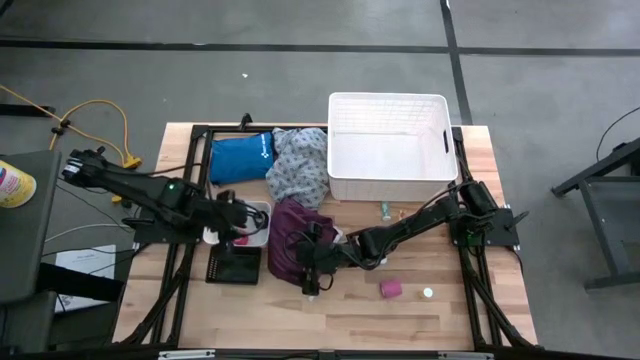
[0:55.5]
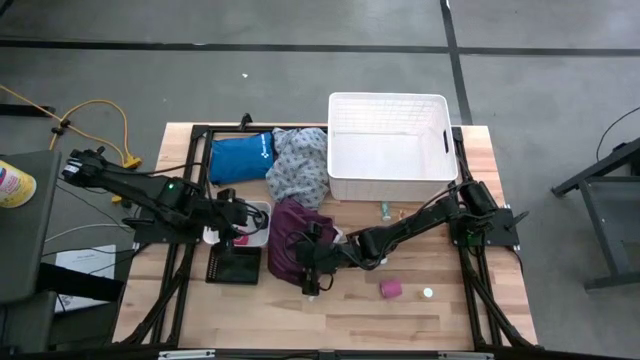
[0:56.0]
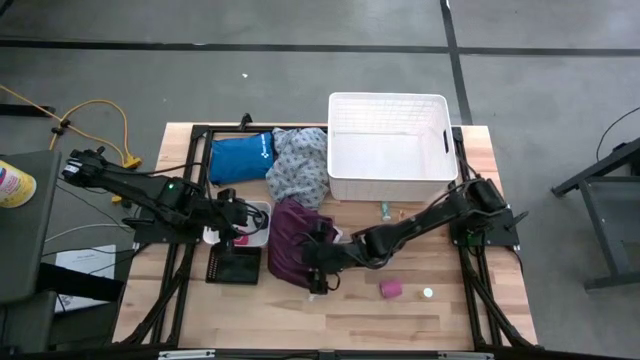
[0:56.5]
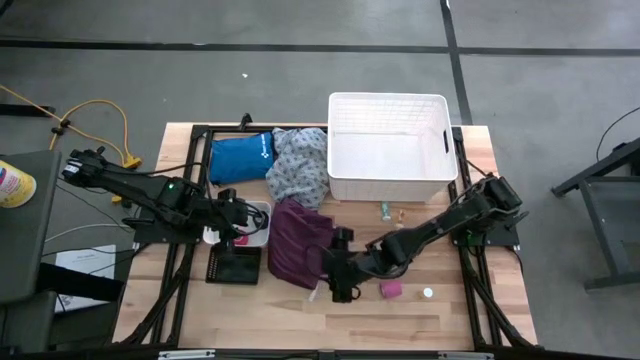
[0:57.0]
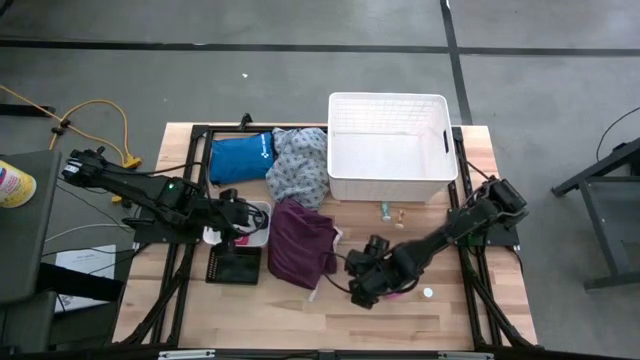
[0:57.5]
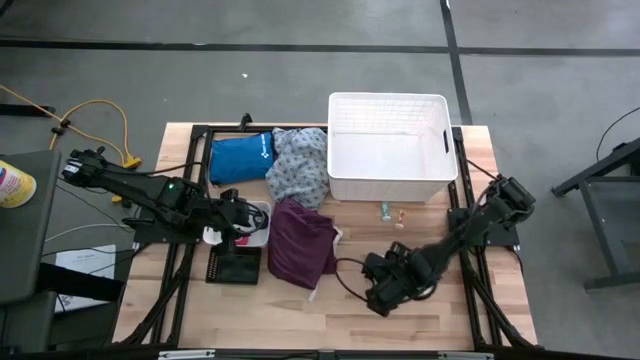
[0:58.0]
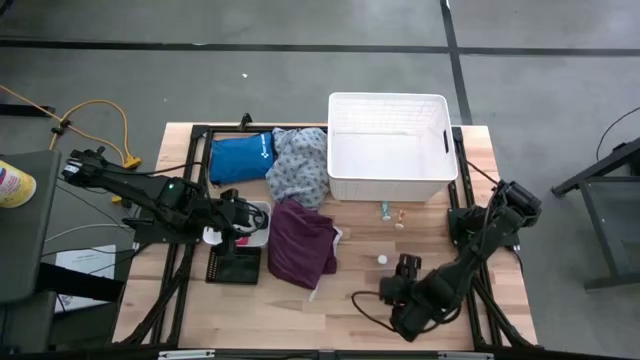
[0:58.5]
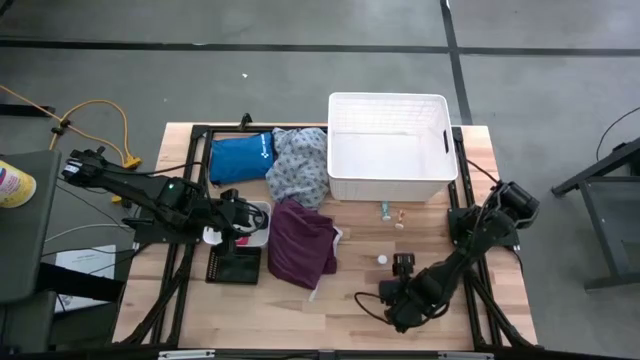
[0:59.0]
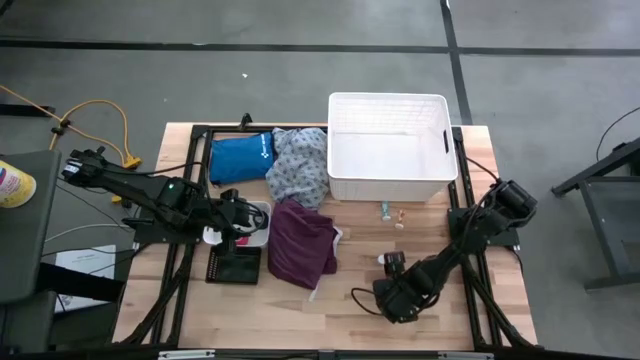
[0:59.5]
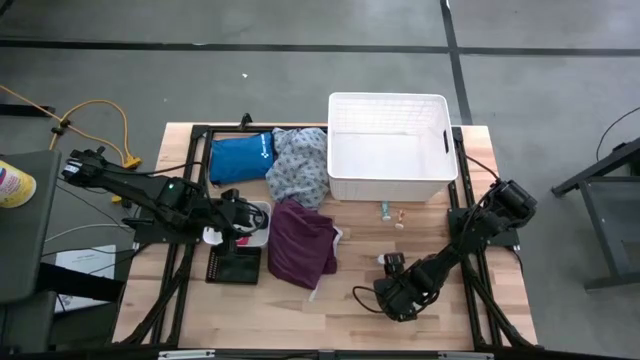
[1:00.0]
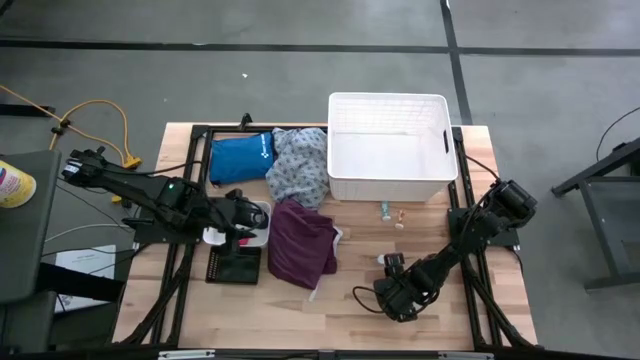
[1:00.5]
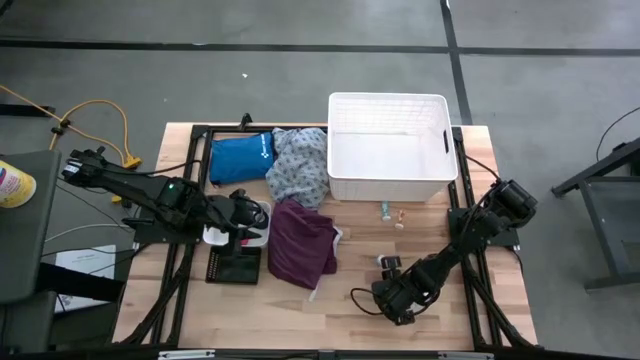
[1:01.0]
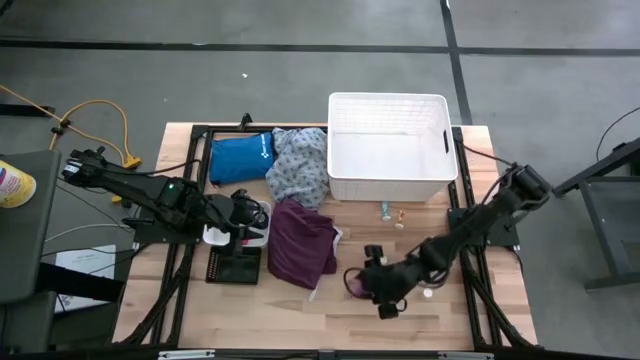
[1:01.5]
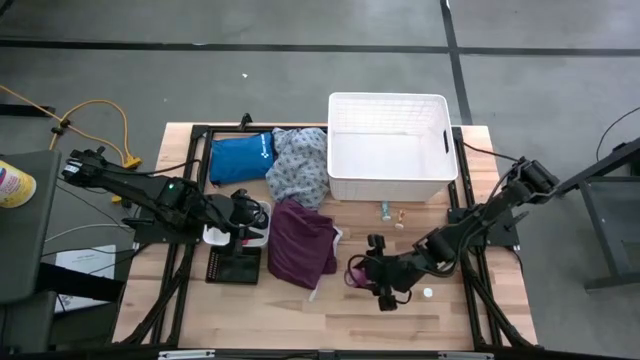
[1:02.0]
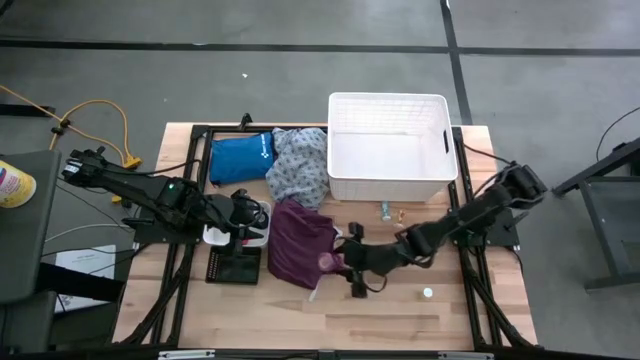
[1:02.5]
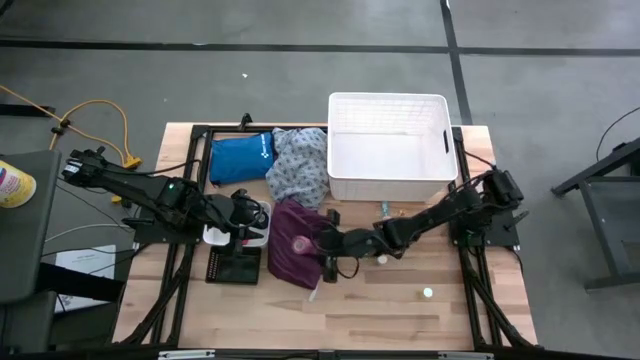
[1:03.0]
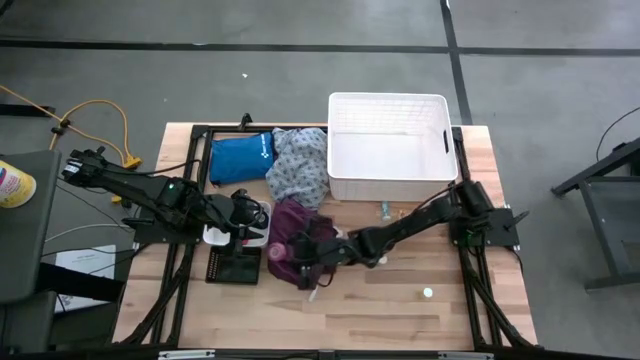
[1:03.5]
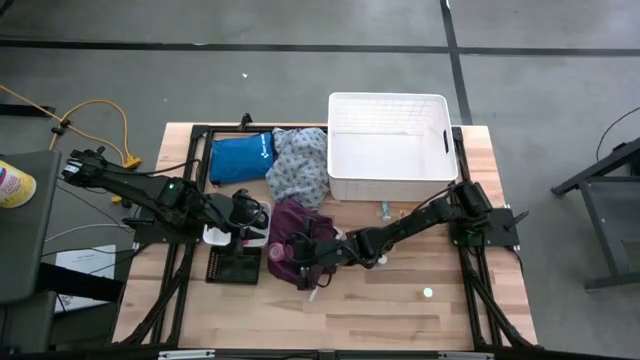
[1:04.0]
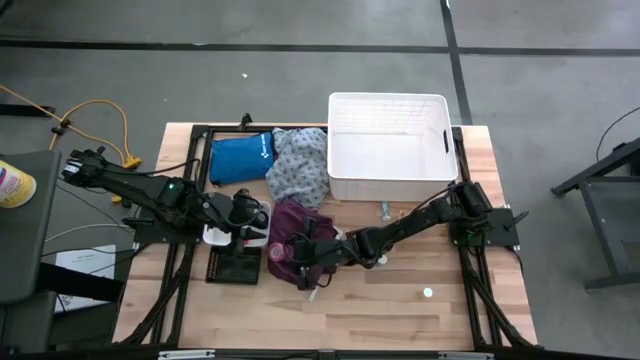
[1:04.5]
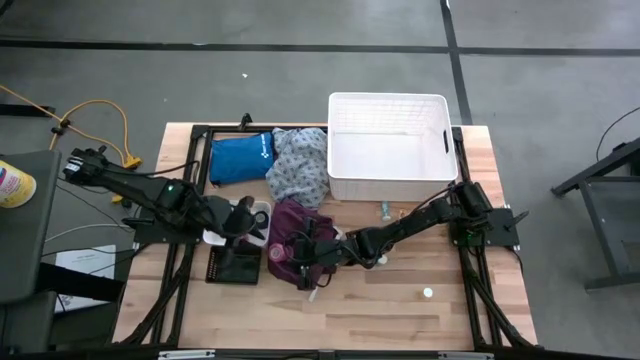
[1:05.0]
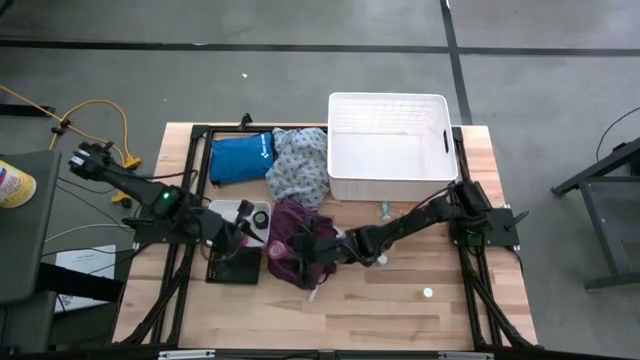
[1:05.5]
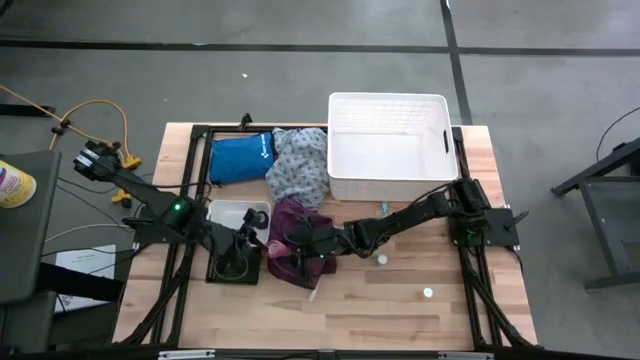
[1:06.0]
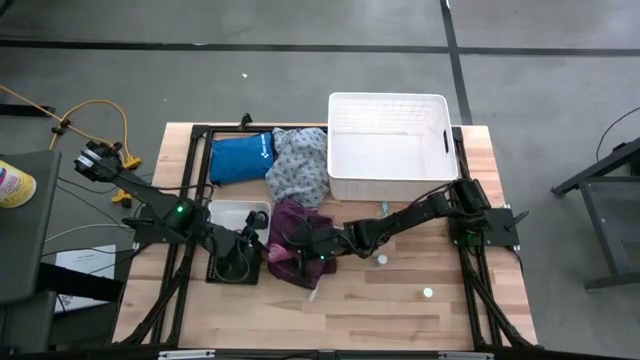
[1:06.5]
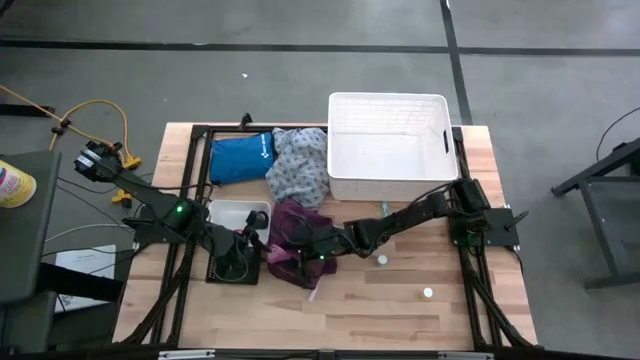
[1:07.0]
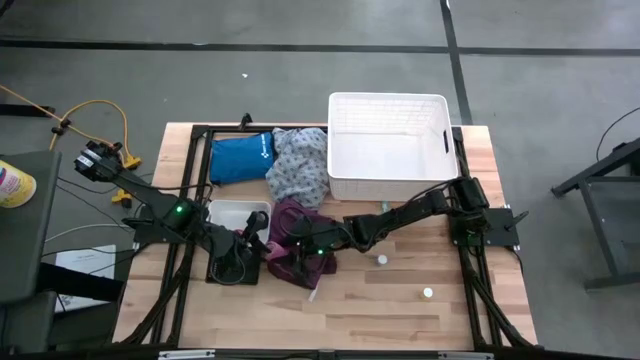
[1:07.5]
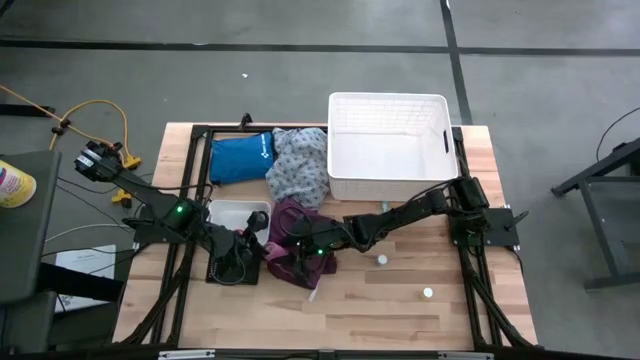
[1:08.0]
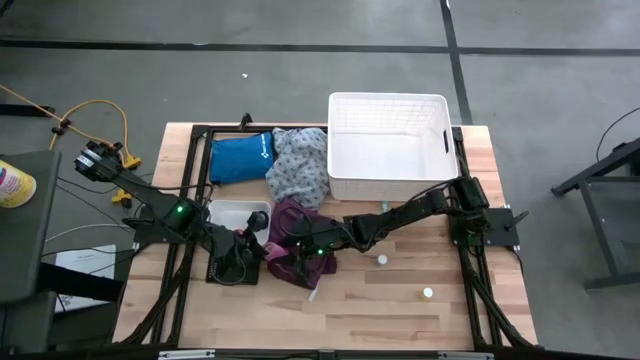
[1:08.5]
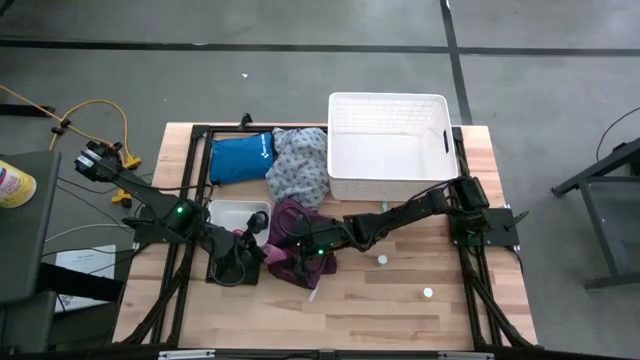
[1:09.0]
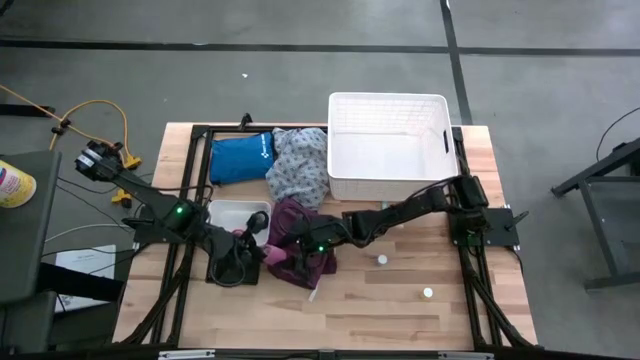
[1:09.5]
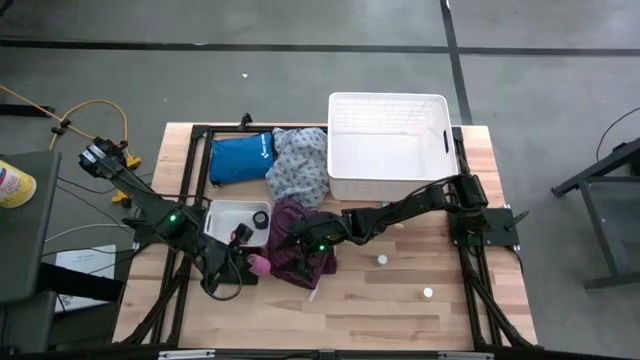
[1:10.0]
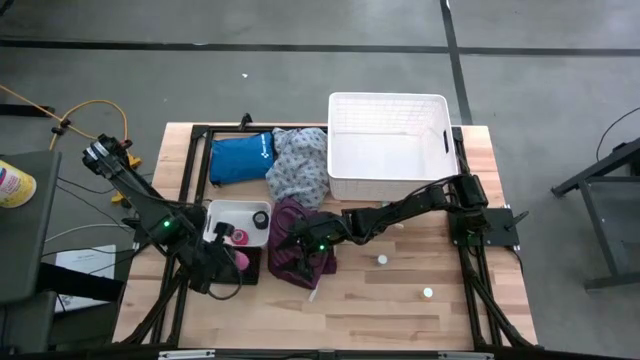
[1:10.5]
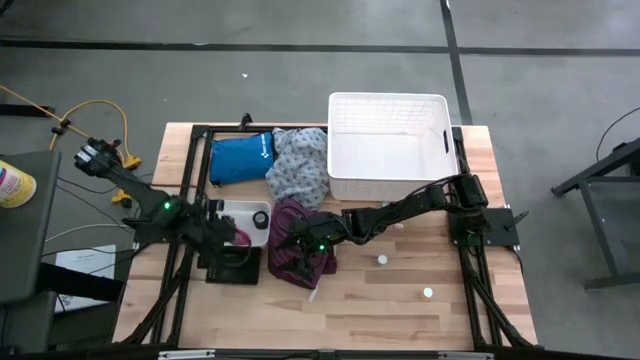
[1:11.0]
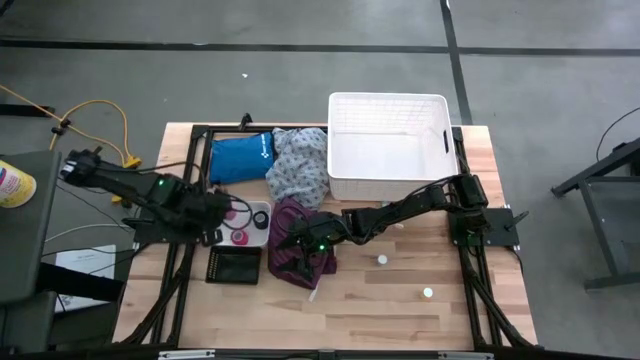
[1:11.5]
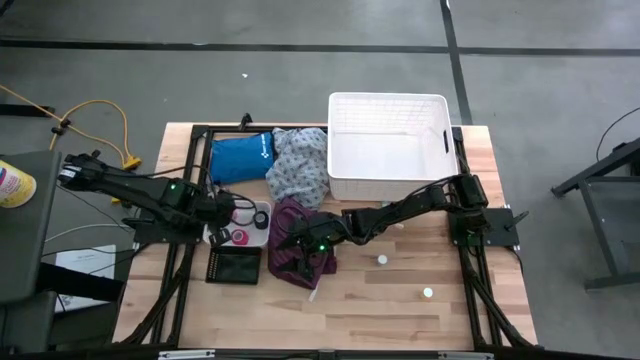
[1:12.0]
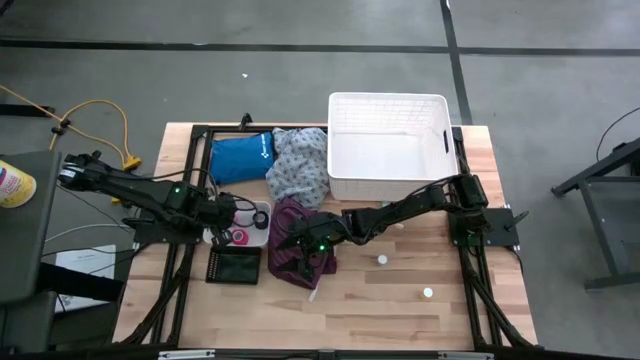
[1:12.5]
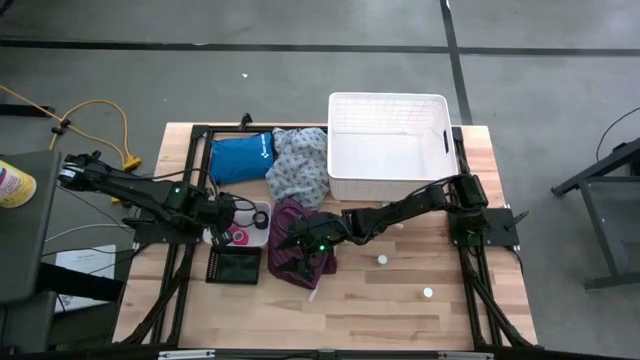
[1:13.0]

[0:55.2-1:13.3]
Task: Pick & place medical supplies in basket/bin
Put the pink bandage into the white bin

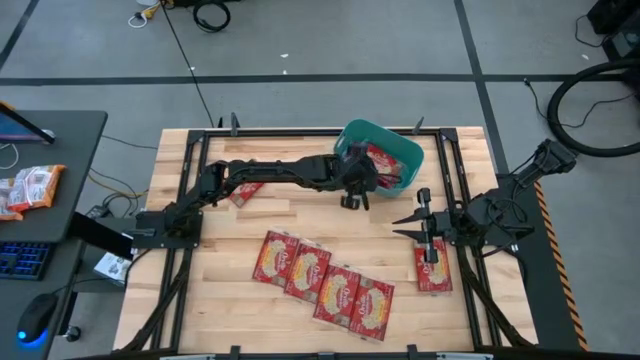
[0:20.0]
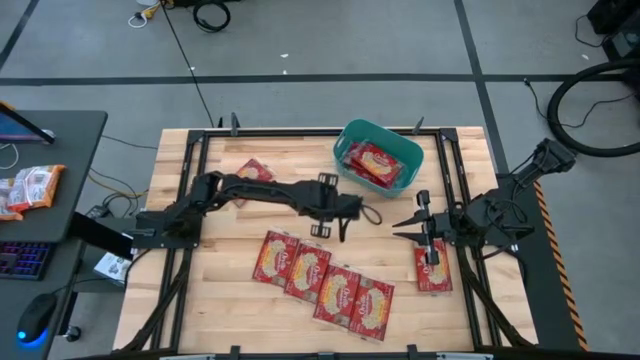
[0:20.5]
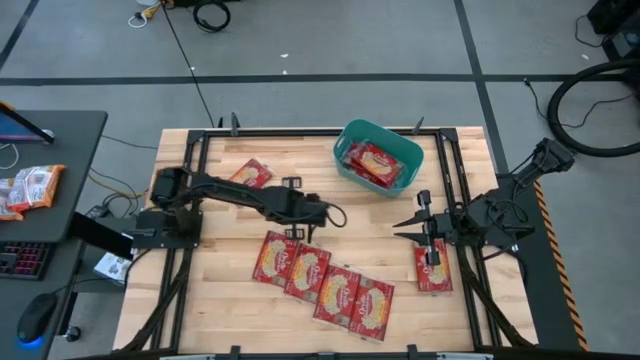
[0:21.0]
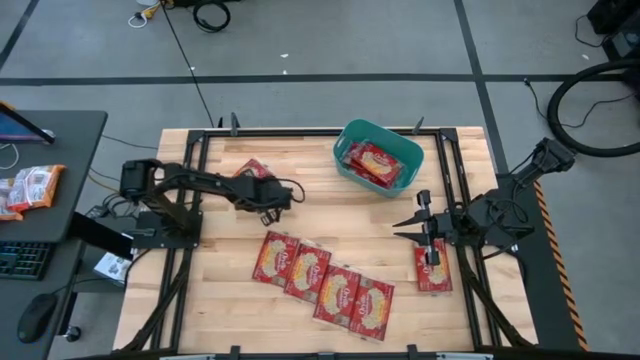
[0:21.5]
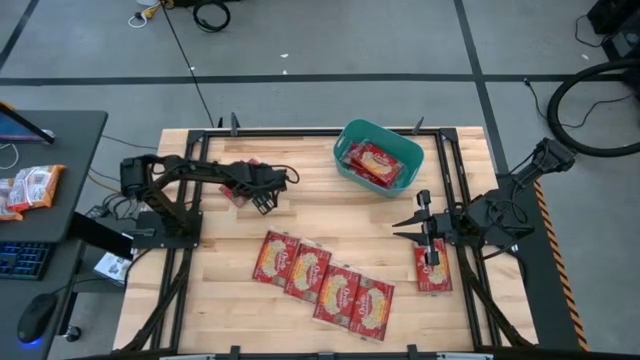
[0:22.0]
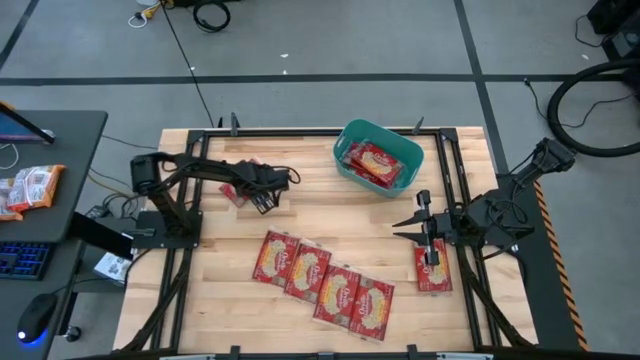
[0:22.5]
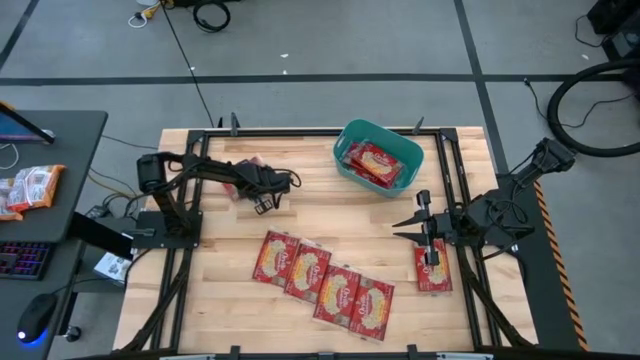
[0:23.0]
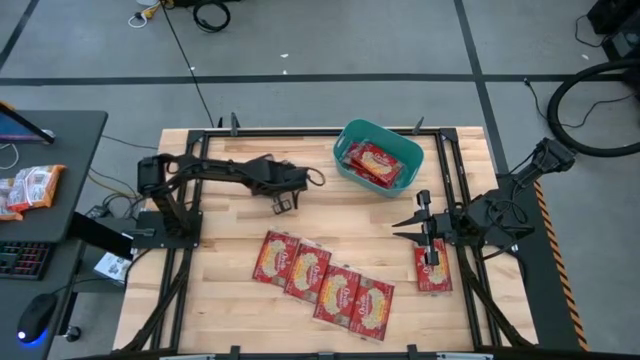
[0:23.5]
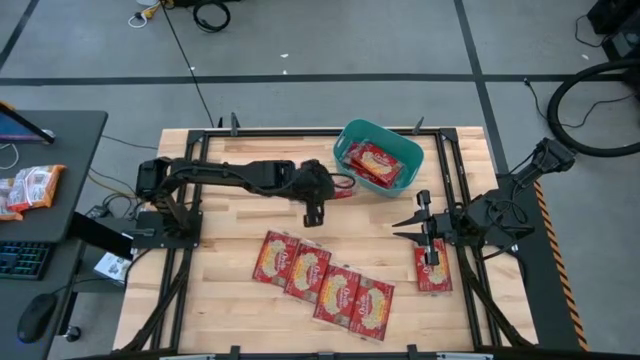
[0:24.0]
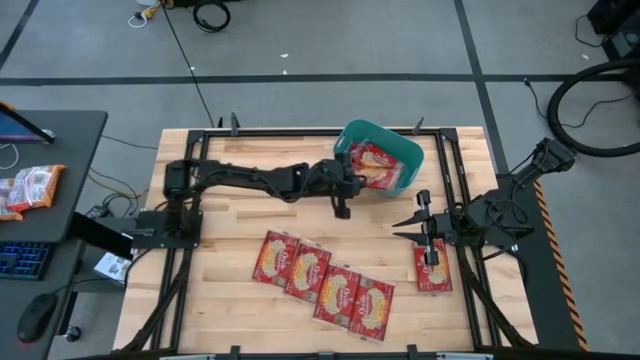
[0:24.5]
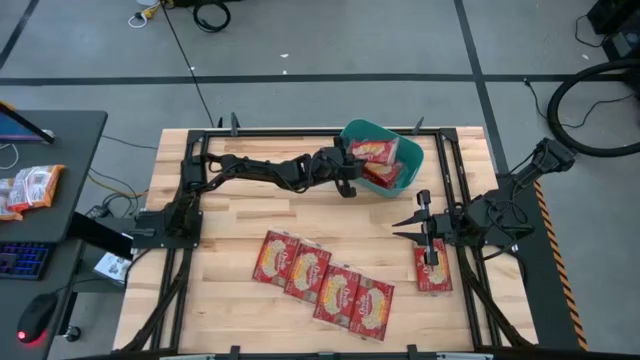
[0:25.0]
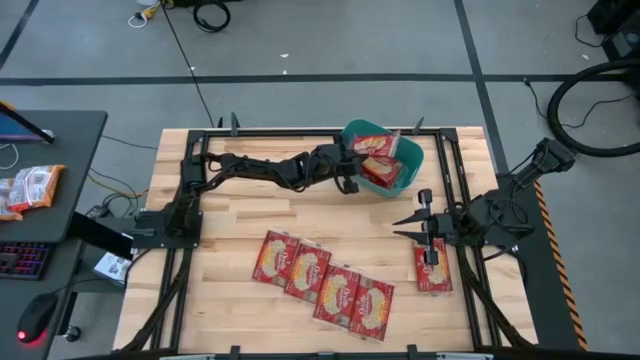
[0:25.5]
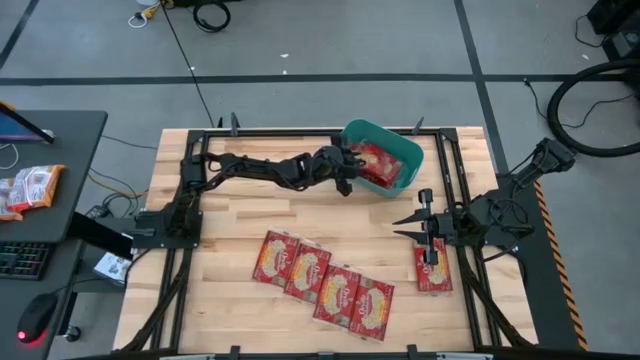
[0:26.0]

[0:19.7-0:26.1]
Task: Sort popcorn bags into baskets
Put the popcorn bag into the bin
